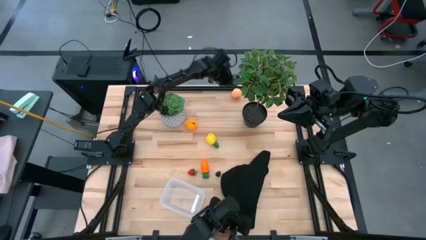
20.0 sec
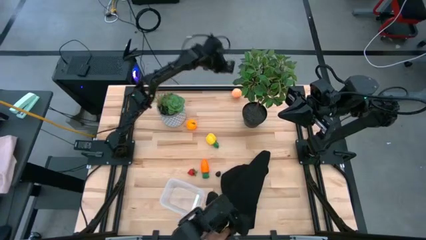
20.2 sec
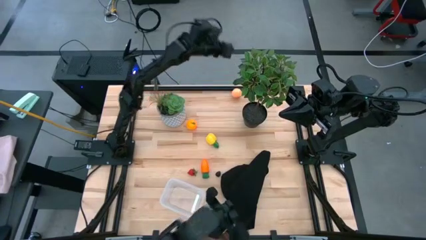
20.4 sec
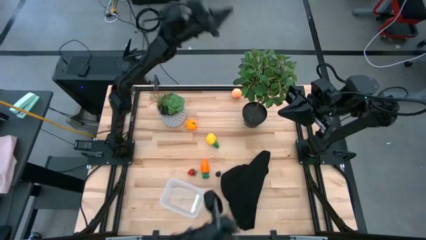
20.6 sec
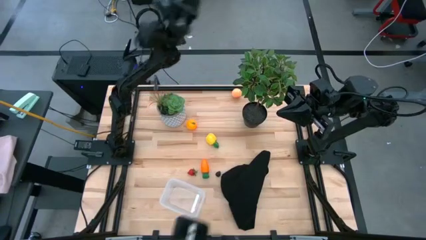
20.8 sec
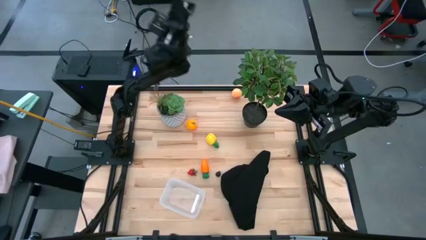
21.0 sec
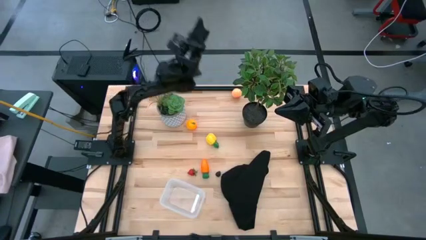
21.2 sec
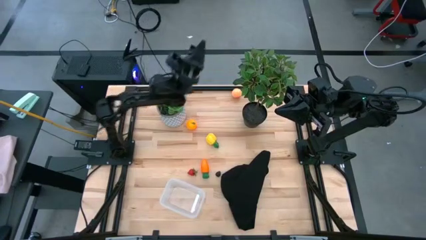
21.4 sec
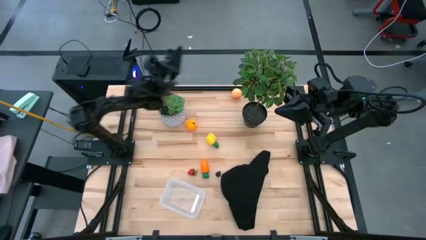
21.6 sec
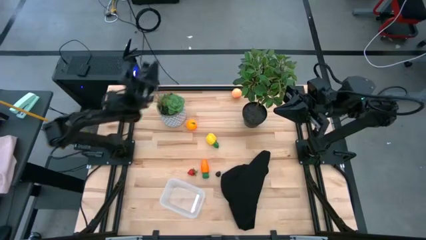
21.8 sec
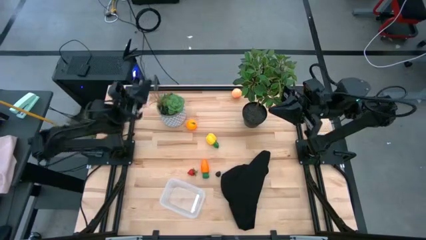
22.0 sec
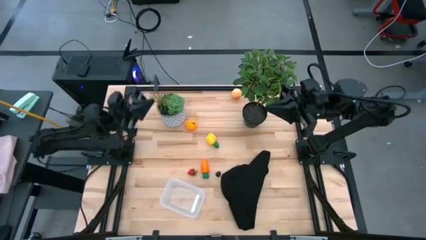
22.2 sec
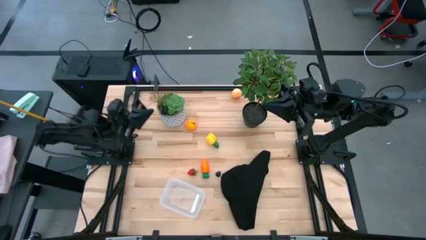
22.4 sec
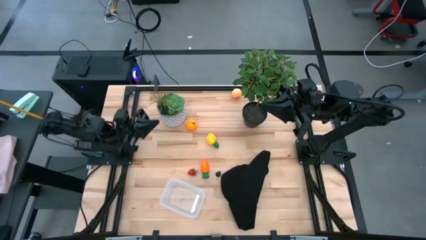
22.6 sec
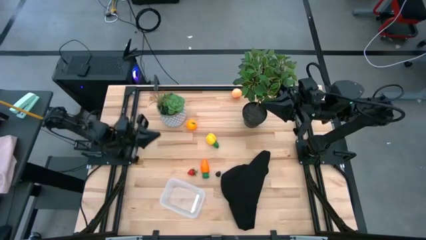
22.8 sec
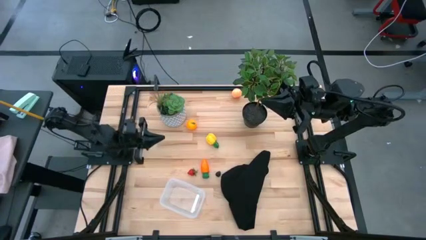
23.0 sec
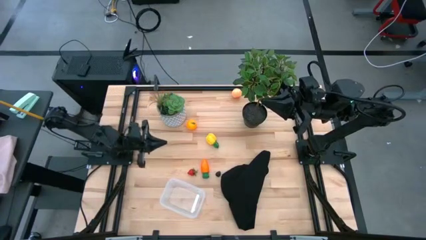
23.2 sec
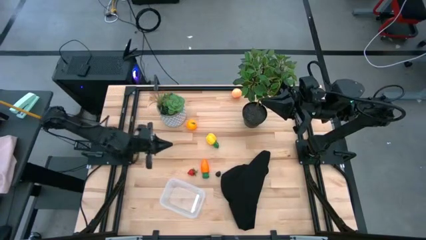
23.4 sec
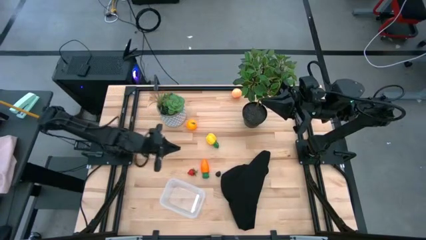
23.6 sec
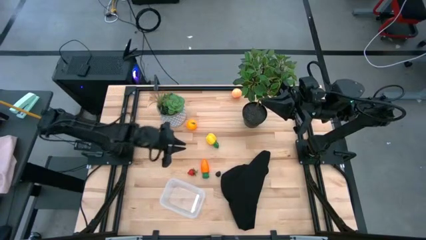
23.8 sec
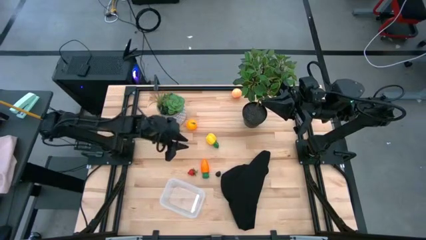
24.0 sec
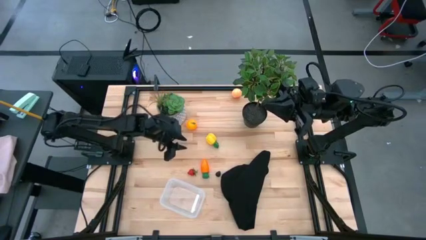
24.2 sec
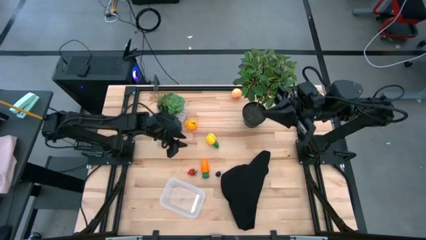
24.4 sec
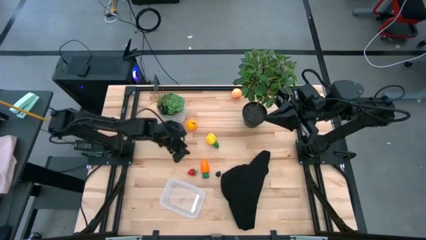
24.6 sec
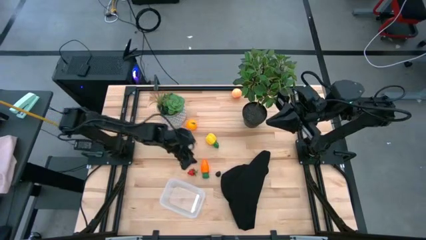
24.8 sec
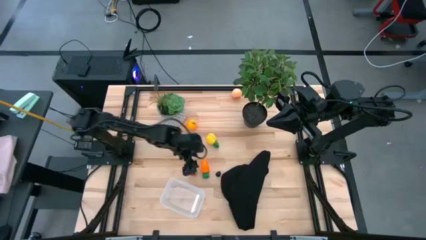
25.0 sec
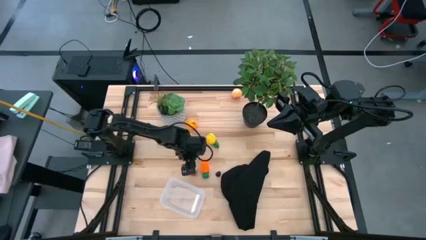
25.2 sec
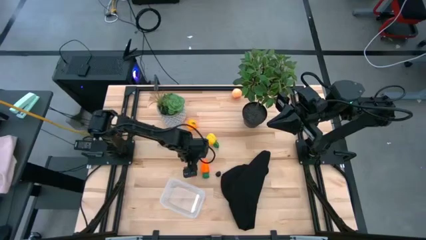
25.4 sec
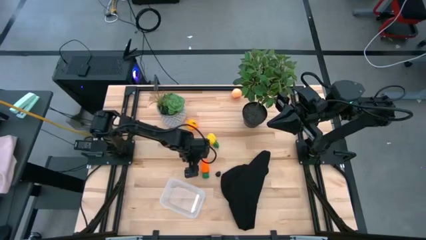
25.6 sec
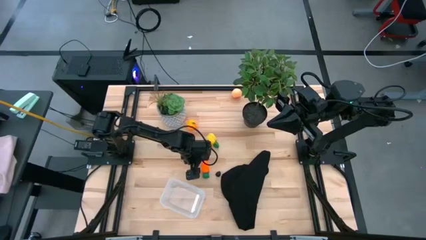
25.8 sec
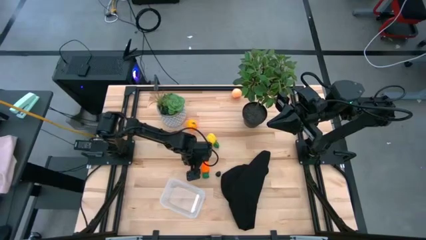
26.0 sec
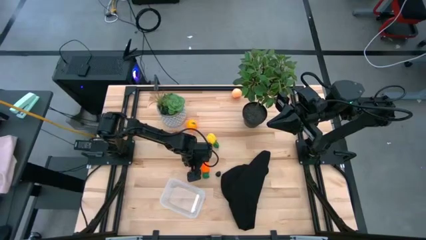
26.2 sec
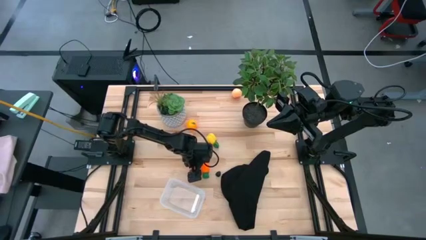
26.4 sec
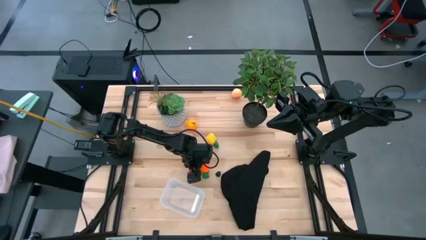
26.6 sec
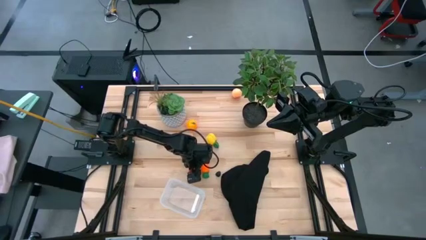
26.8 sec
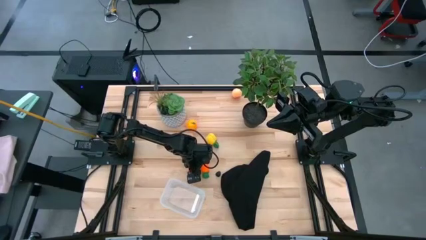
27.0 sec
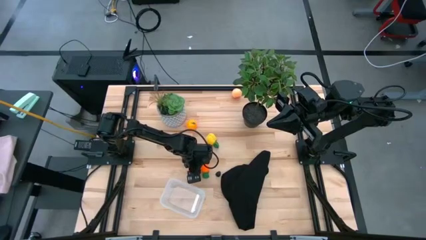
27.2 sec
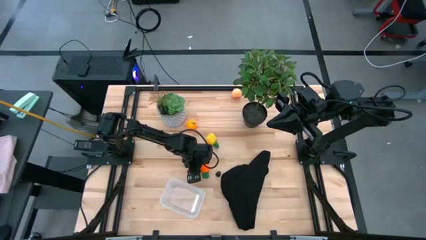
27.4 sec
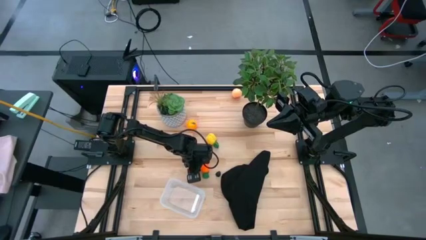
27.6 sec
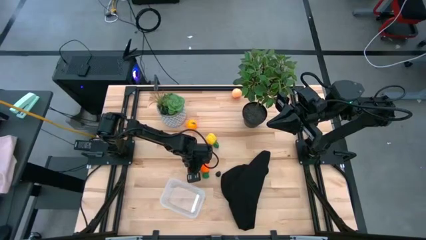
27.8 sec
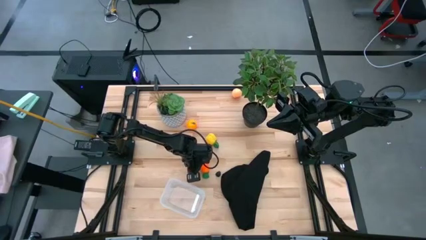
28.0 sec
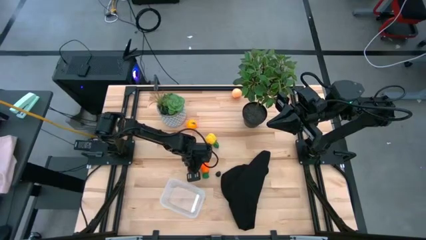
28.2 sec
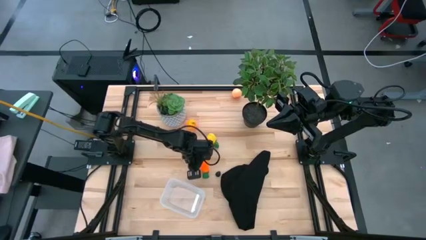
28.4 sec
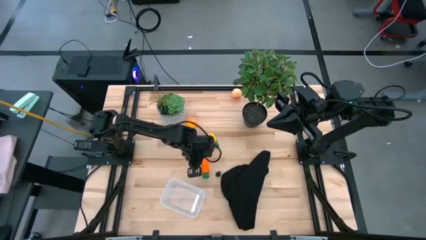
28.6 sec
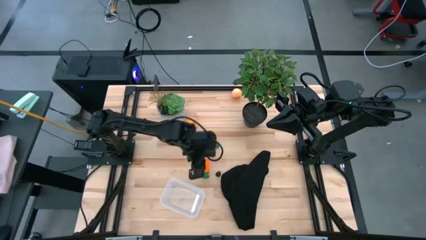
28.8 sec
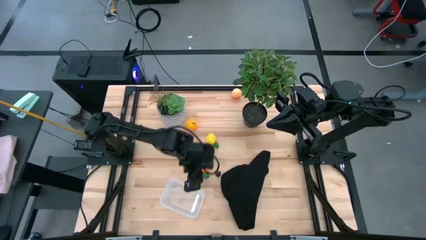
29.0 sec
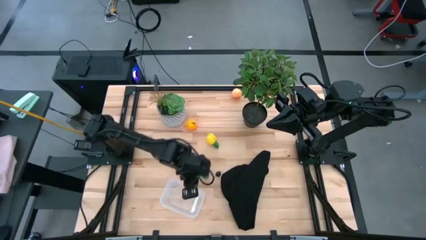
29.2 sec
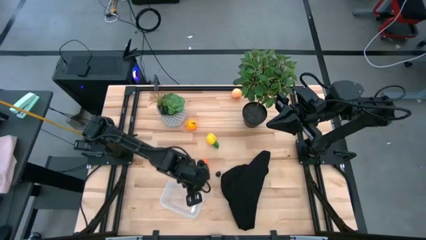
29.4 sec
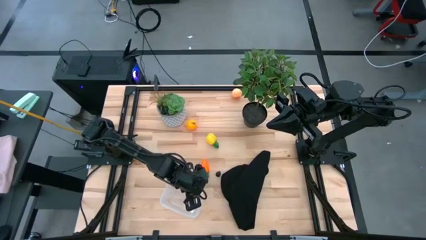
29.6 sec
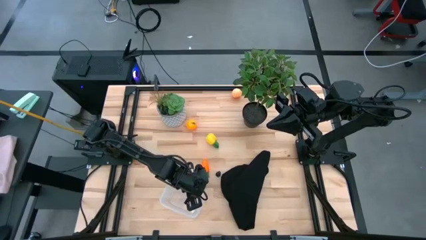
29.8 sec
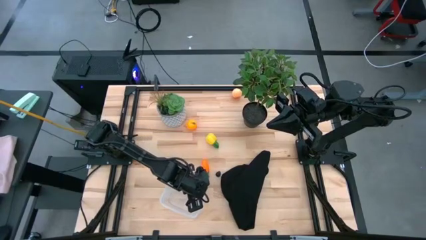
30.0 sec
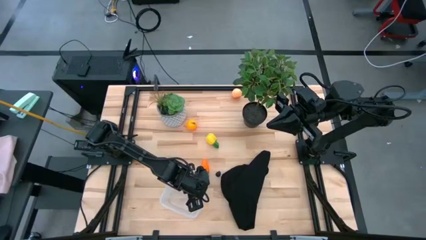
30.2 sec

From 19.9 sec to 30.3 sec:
Task: Pick and placing Produce into tupperware
Put the strawberry into the transparent bin

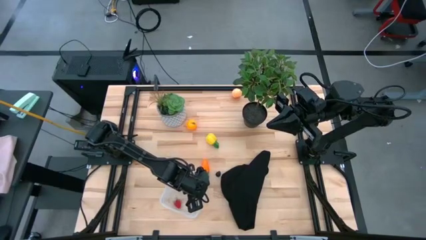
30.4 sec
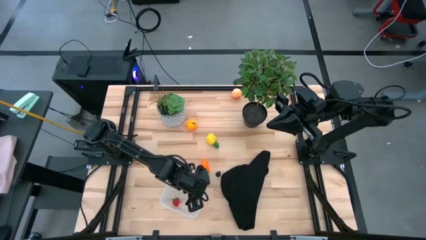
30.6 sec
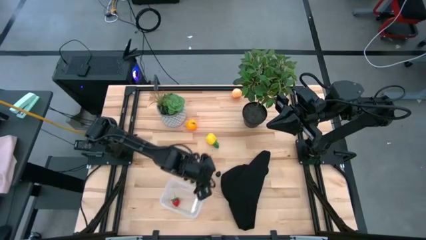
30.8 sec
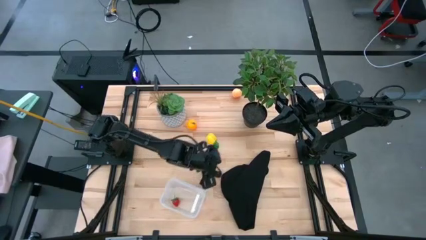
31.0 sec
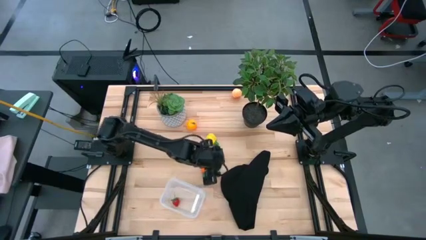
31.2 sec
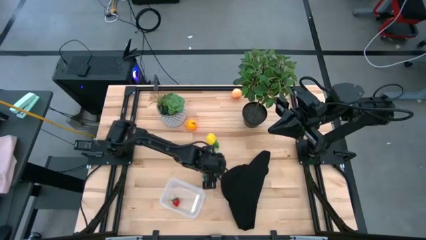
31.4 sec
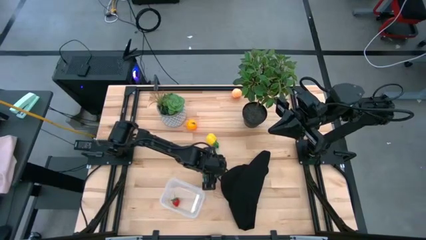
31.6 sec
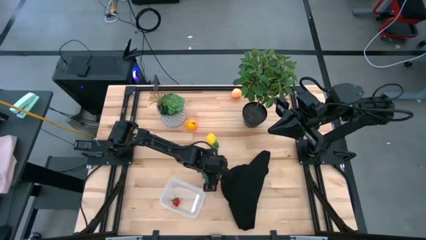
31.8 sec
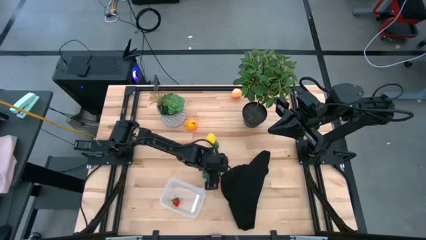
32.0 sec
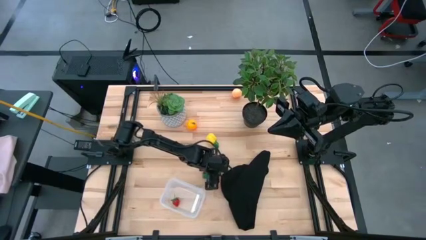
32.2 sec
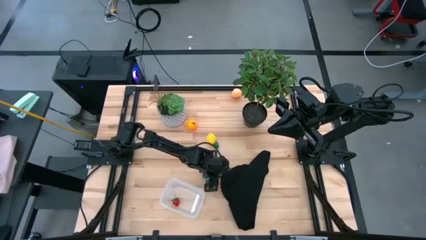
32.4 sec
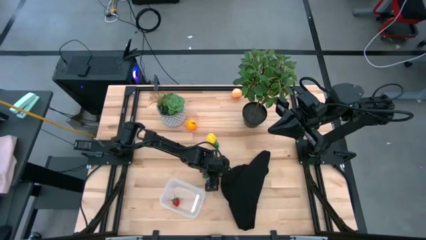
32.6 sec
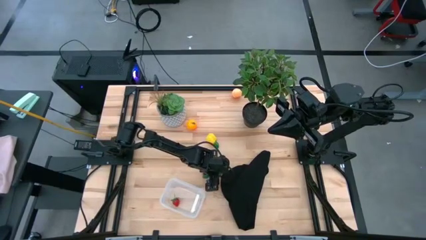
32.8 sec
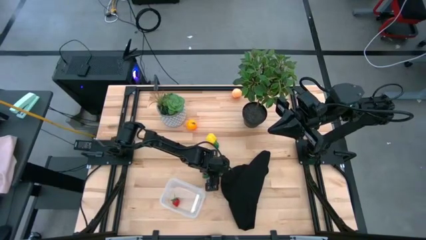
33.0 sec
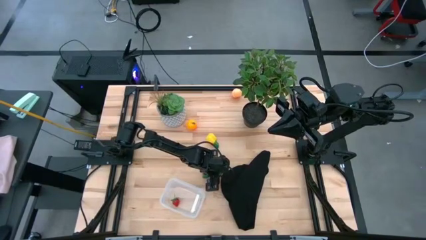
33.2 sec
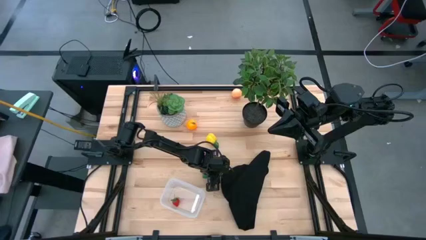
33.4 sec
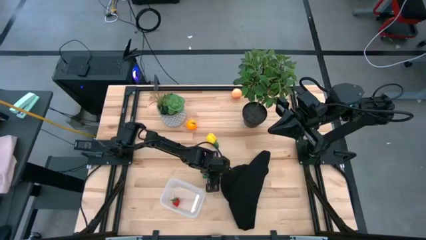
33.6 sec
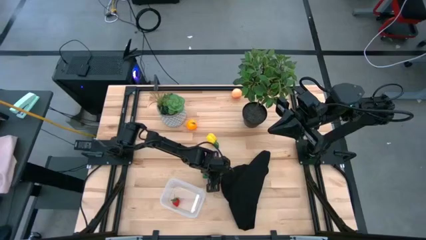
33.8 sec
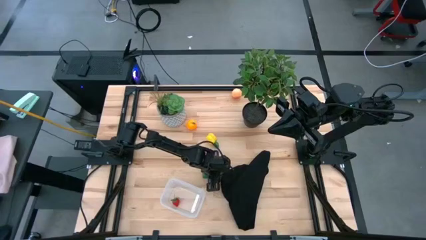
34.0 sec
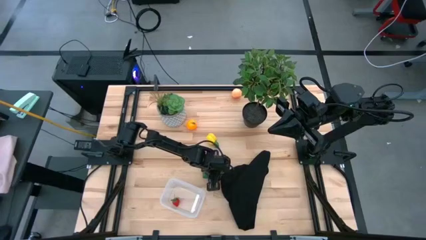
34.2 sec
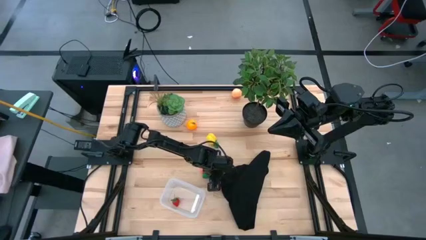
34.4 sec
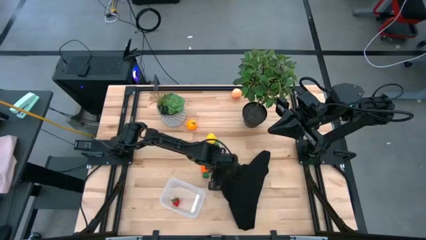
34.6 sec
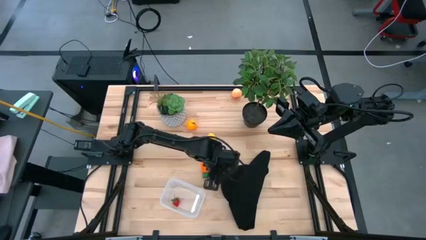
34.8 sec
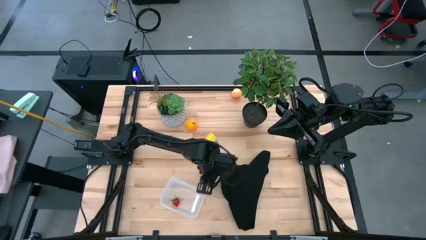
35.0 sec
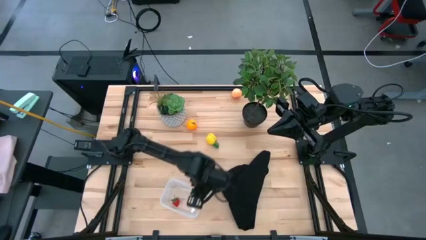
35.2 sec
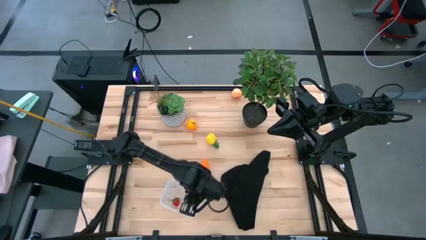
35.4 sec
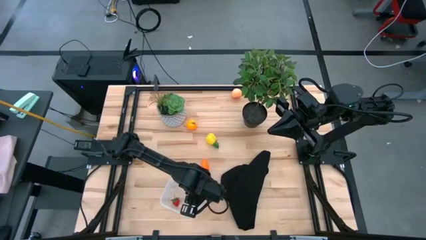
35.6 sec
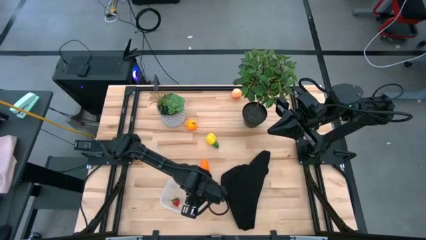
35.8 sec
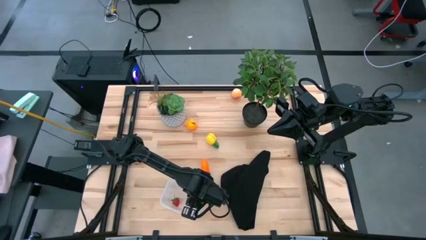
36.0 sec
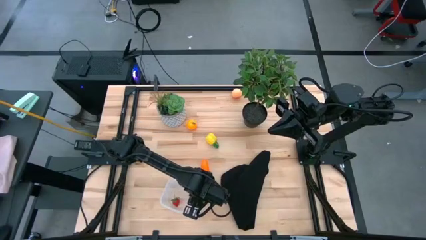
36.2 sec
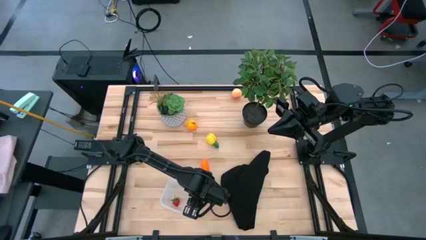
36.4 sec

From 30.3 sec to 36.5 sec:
Put the blackberry into the transparent bin
